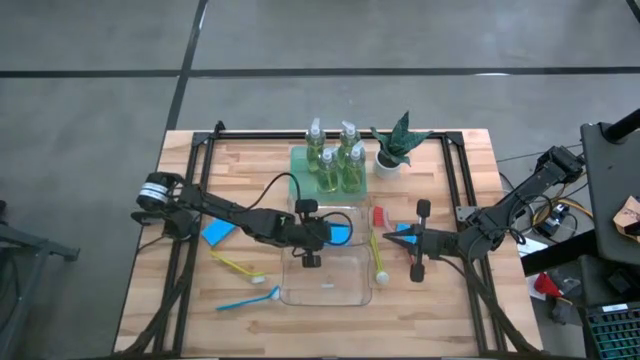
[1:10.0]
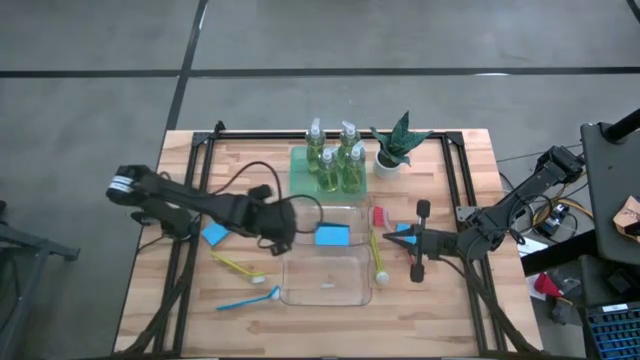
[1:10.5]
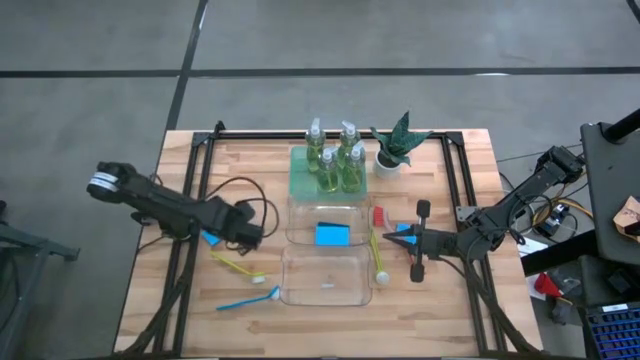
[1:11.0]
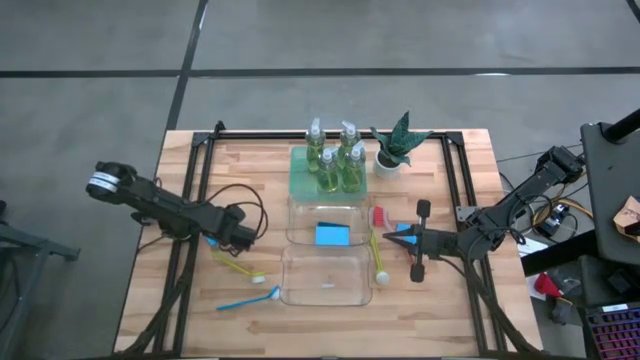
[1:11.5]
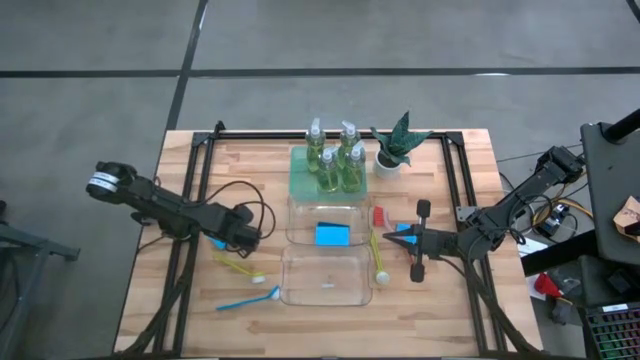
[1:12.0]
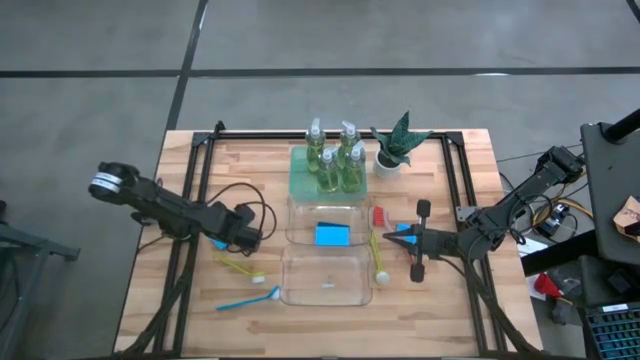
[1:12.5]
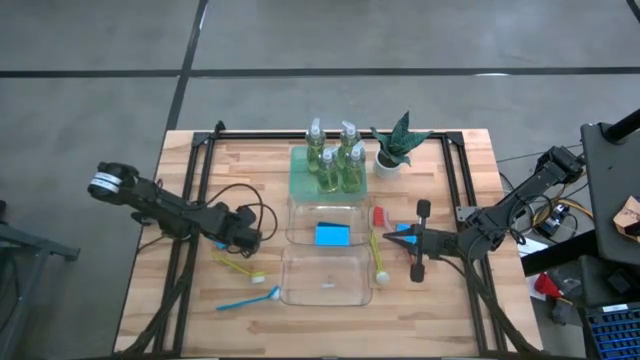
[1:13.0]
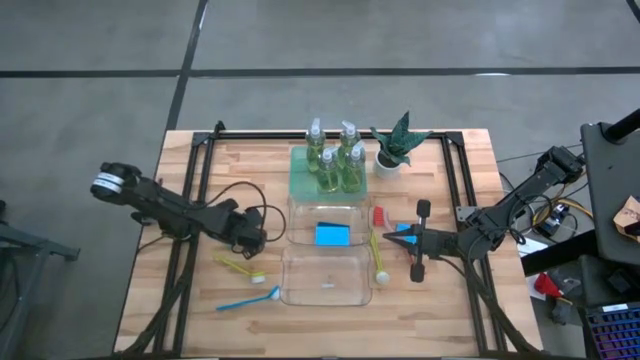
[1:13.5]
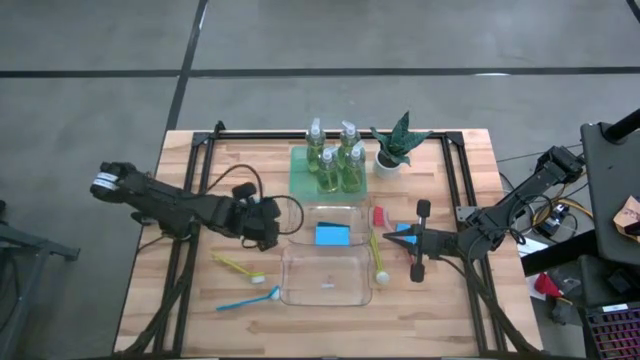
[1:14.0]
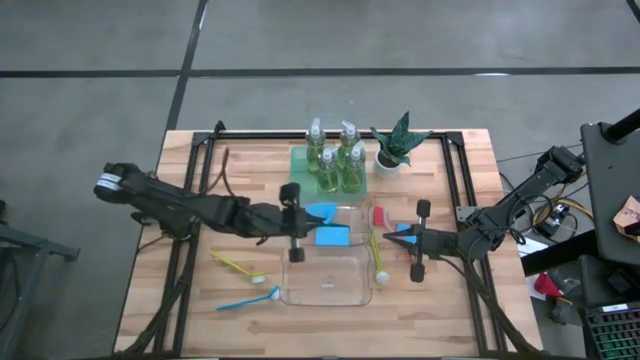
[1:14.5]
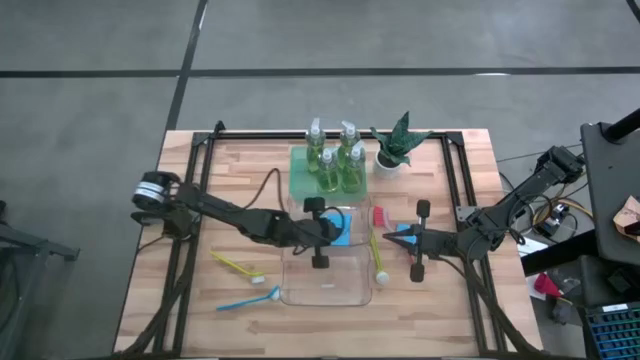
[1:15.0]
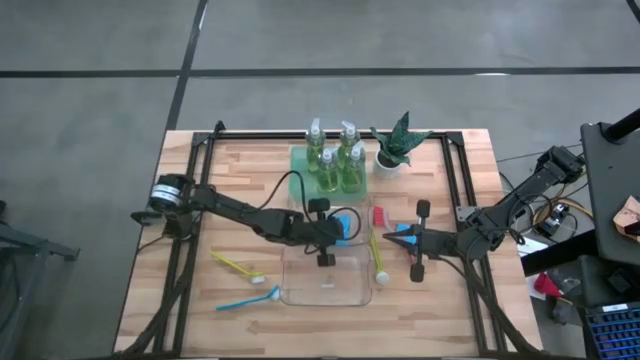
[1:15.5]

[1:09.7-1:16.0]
Task: Pick & Place Kitchen Sink Supplies
Put the blue sponge into the top transparent bin

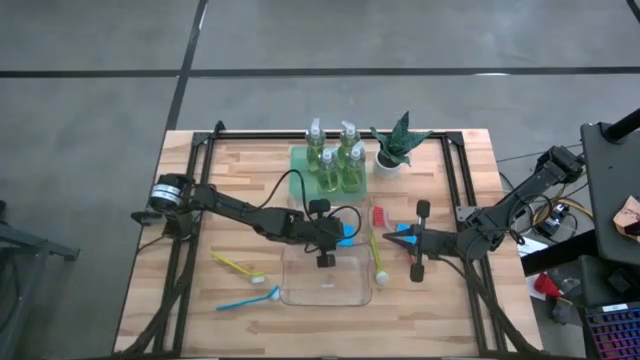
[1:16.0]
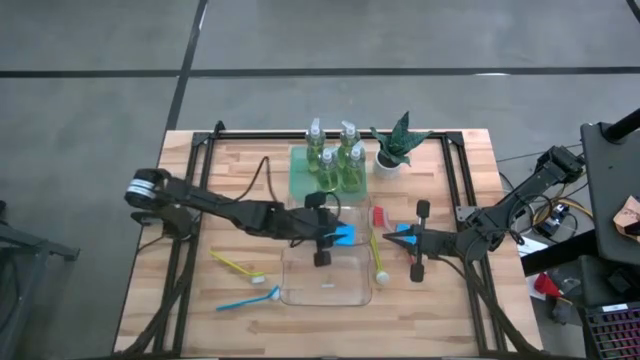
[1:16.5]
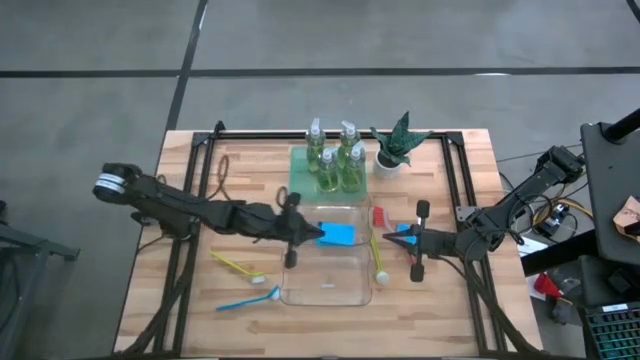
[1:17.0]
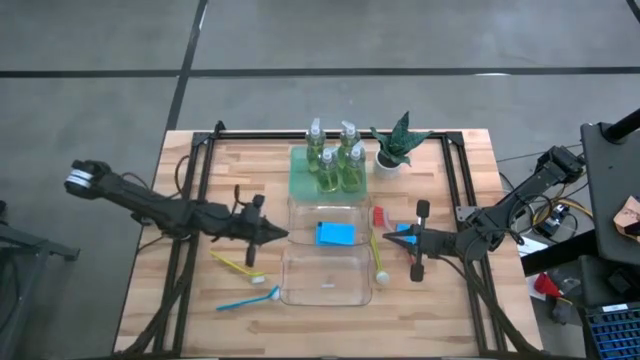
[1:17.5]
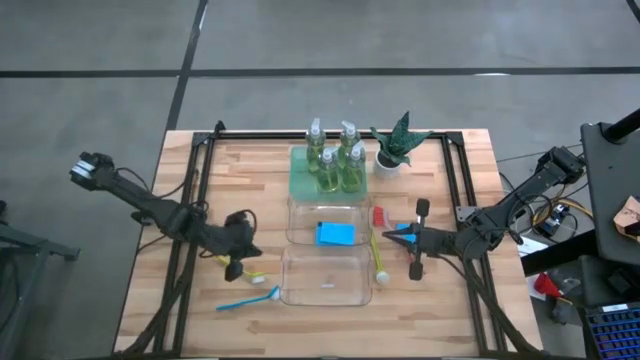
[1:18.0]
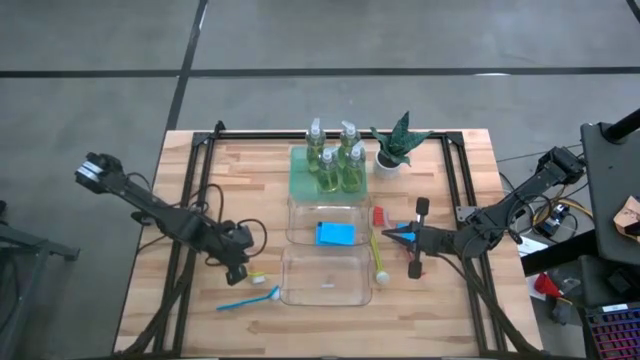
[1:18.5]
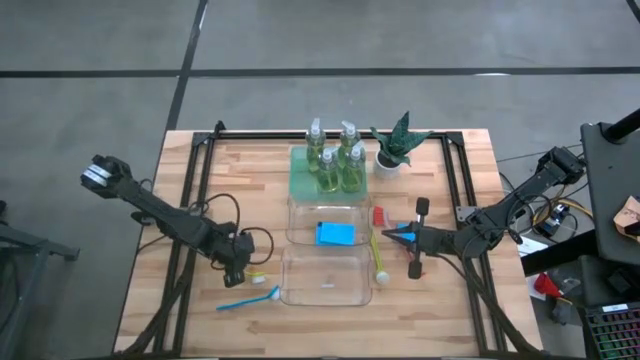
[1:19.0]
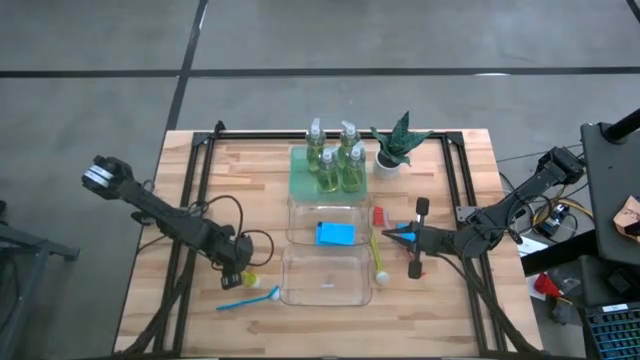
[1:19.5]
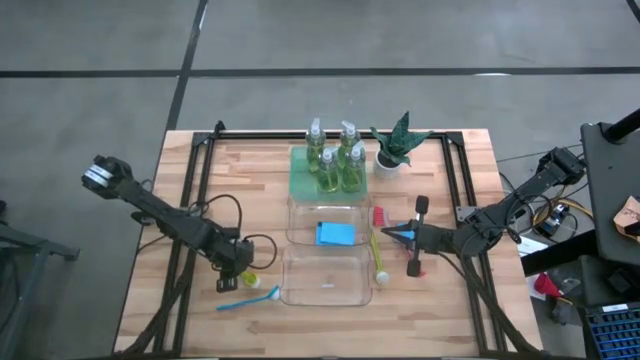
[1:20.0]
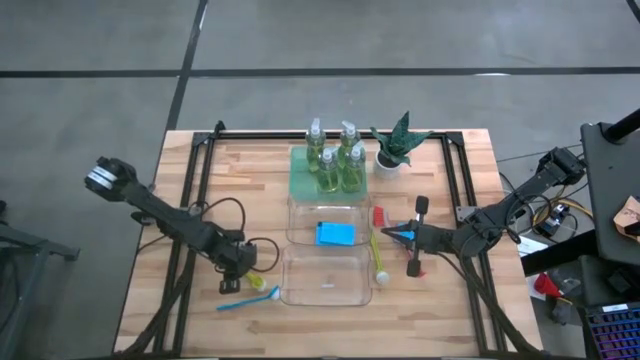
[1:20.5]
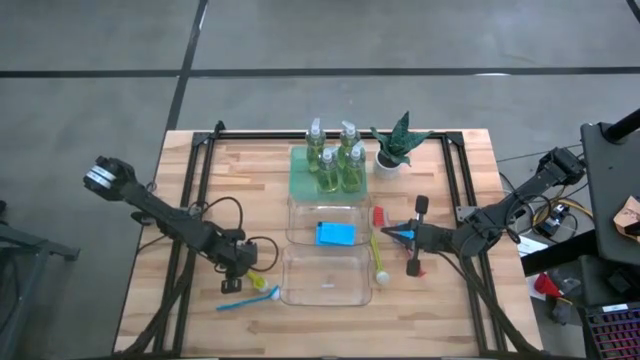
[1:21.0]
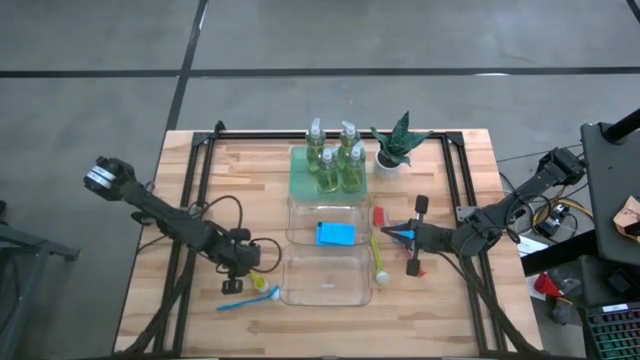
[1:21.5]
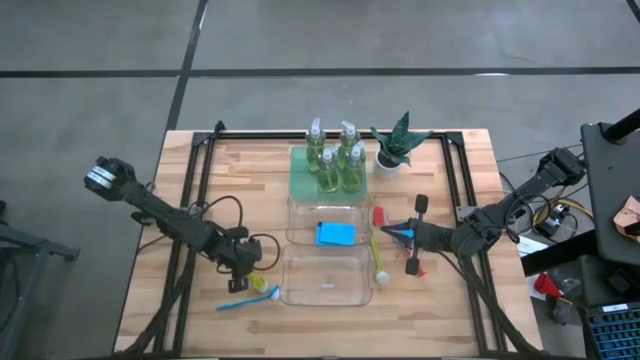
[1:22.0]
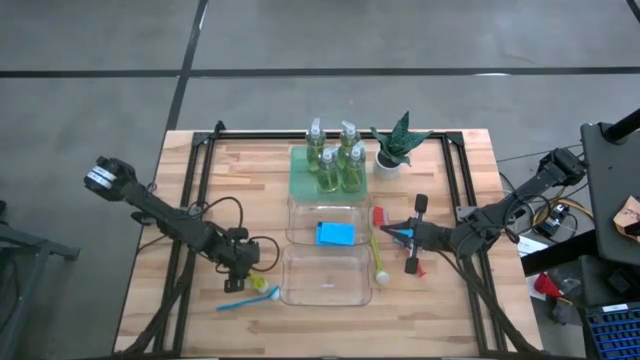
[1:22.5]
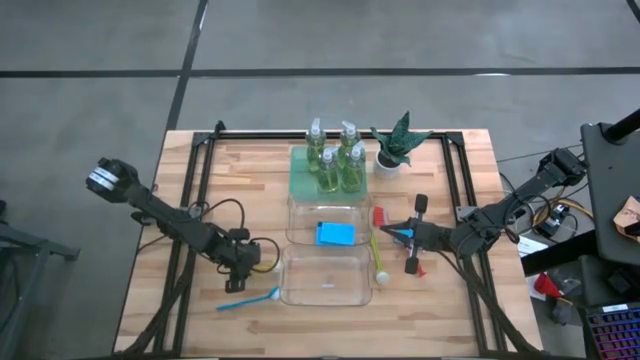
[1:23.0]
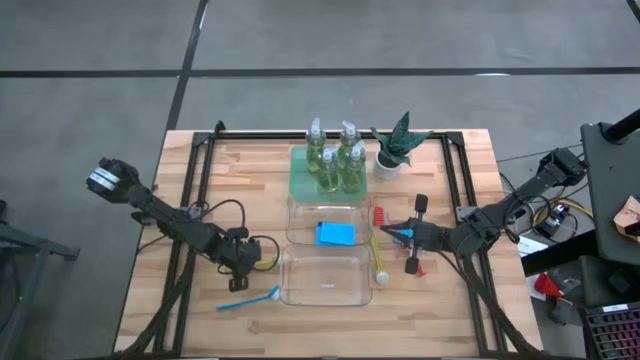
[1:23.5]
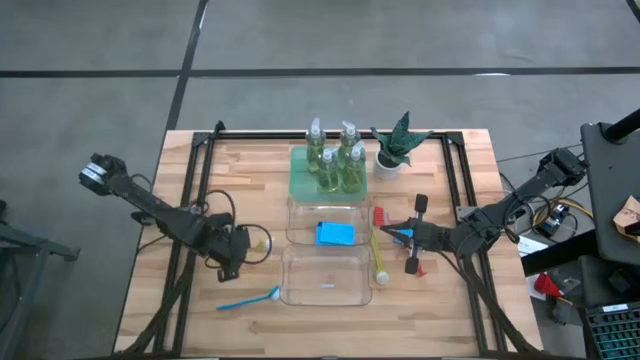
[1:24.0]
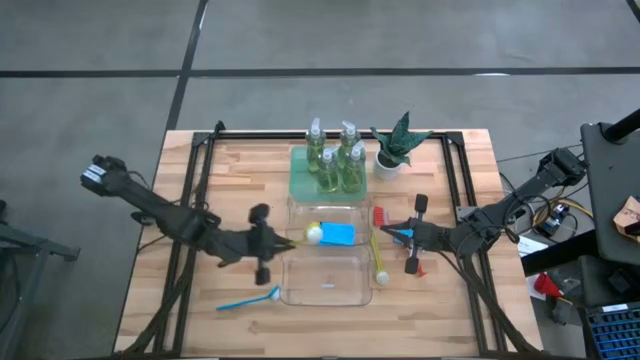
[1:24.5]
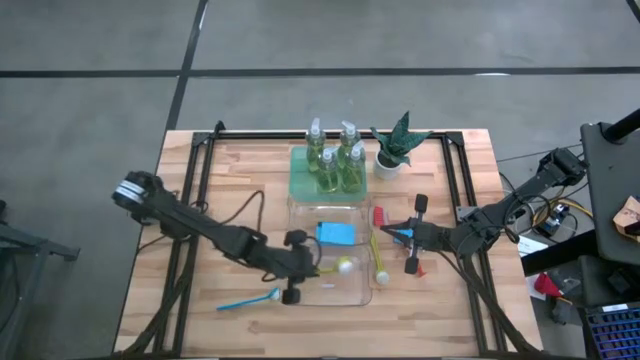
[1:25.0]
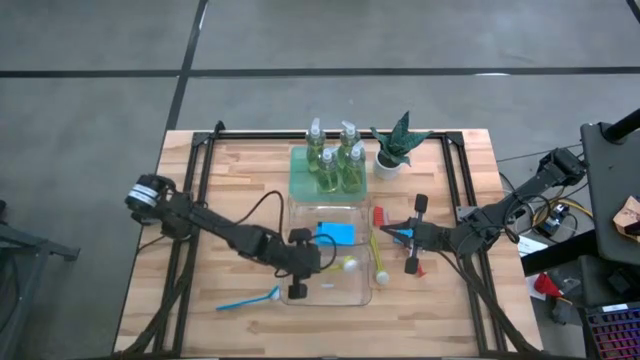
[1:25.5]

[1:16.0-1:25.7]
Put the green dish brush into the bottom transparent bin

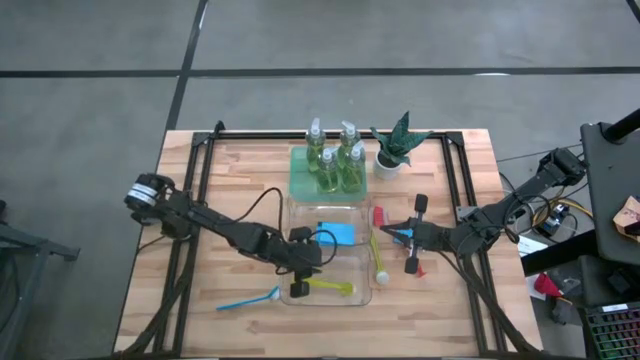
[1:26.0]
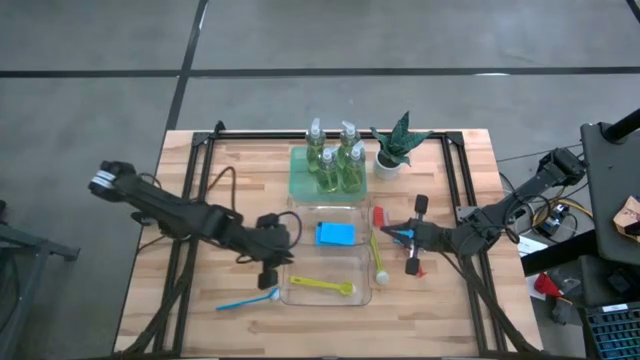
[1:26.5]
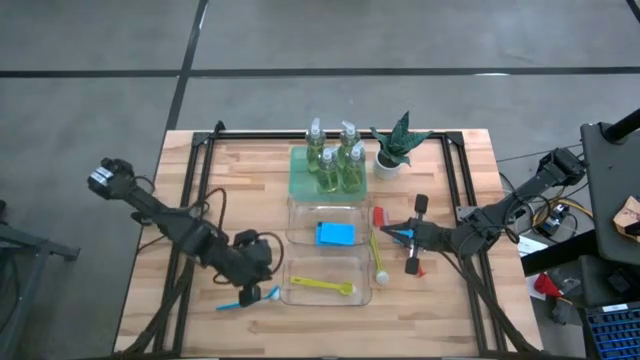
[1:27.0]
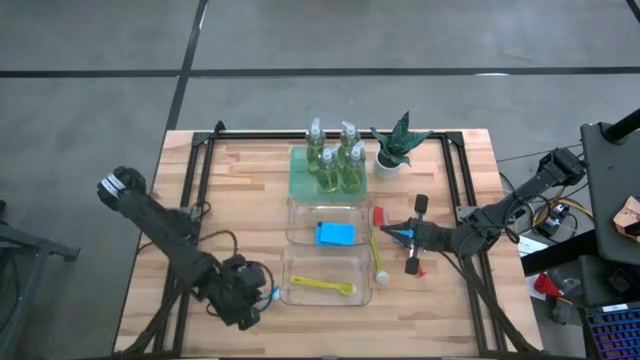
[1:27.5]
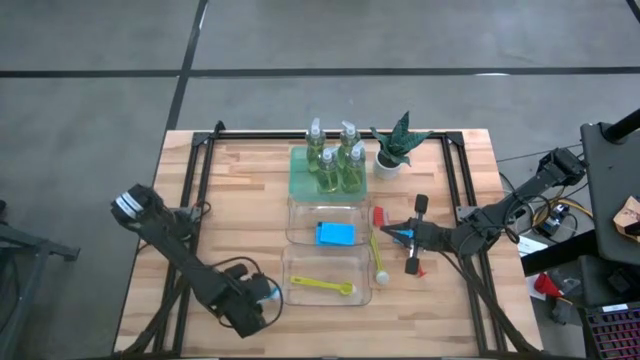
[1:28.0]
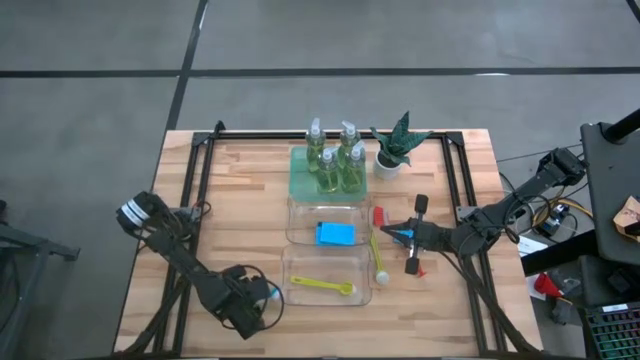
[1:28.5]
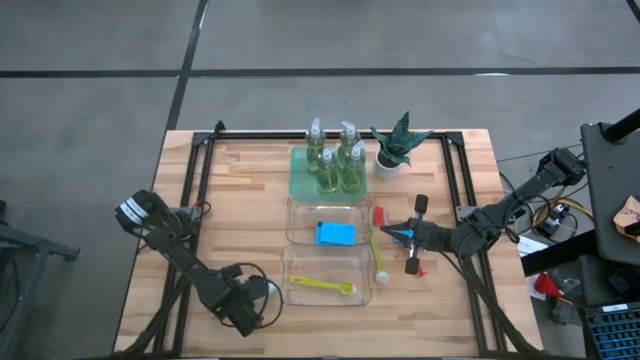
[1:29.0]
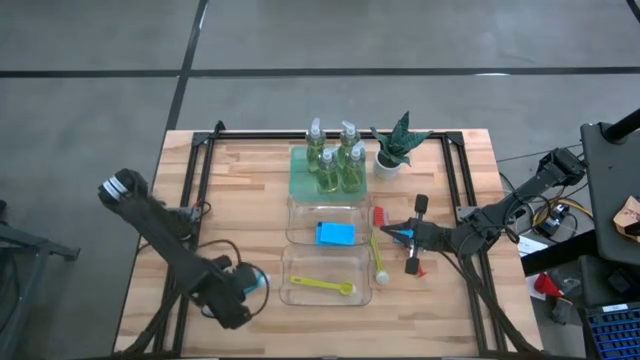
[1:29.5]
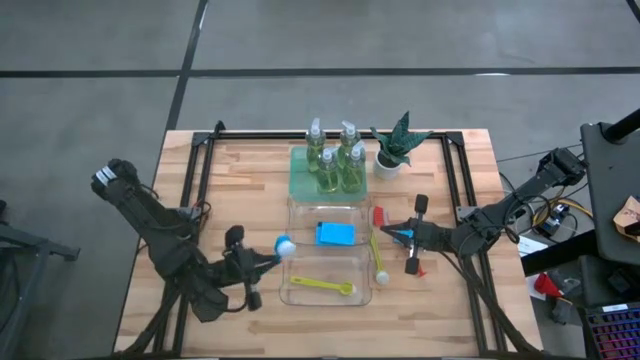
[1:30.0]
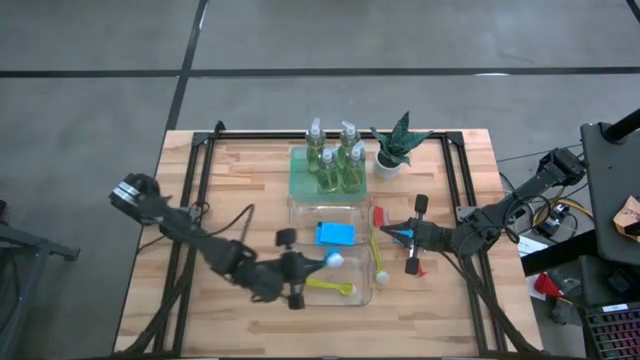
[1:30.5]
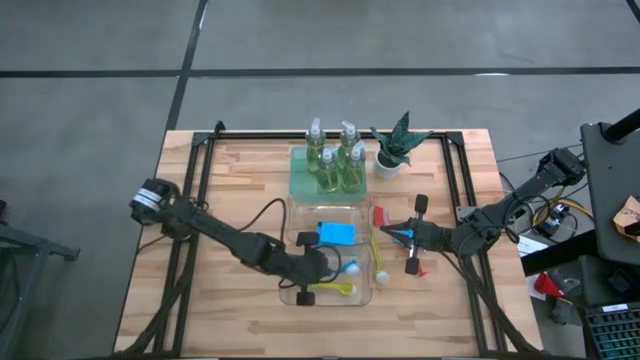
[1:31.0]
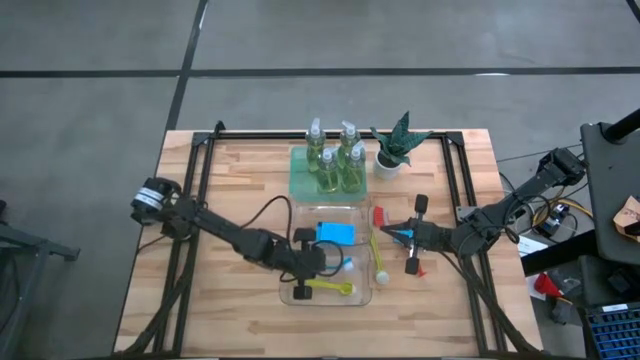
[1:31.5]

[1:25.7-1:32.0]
Put the blue dish brush into the bottom transparent bin
